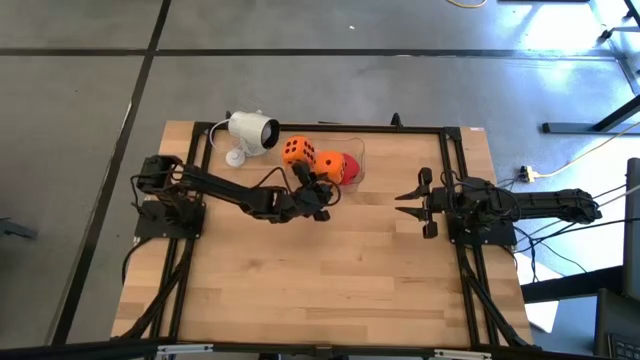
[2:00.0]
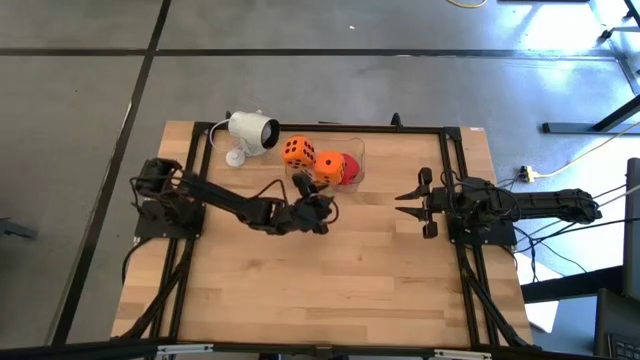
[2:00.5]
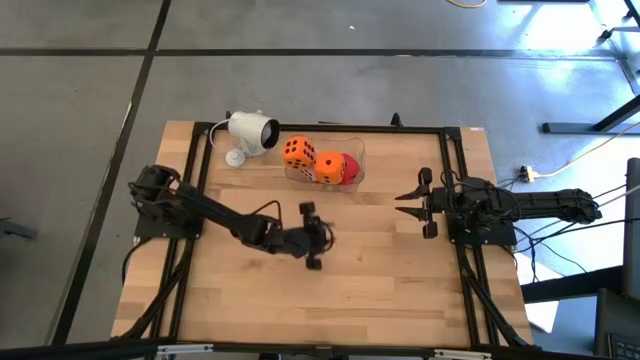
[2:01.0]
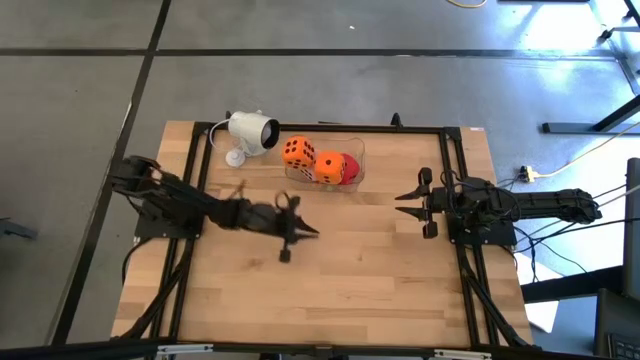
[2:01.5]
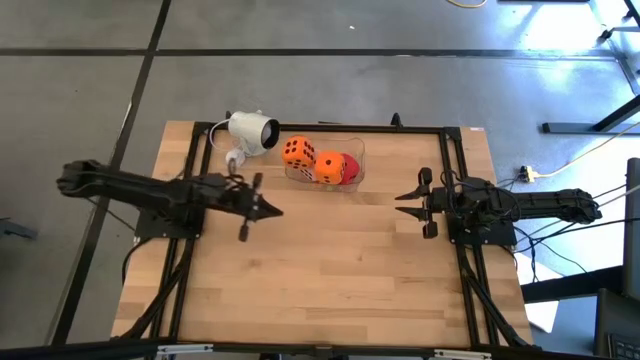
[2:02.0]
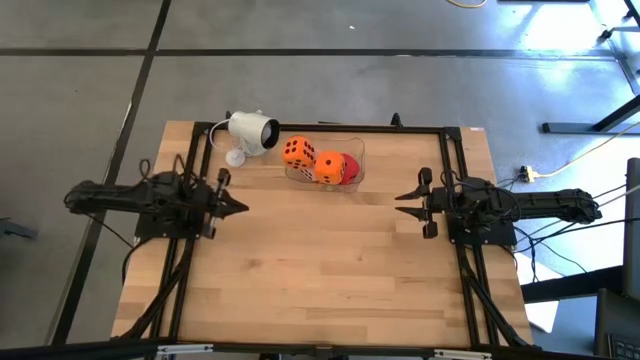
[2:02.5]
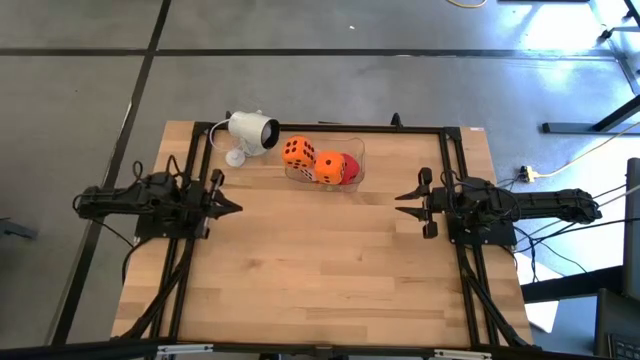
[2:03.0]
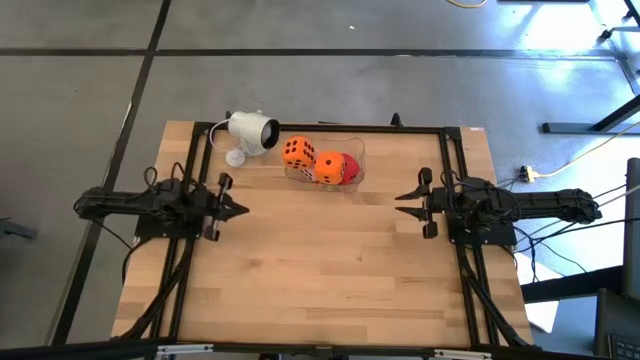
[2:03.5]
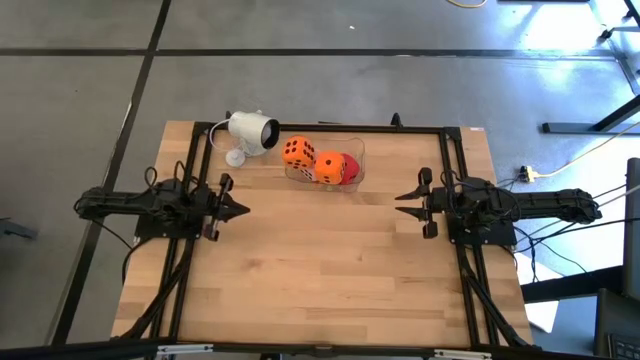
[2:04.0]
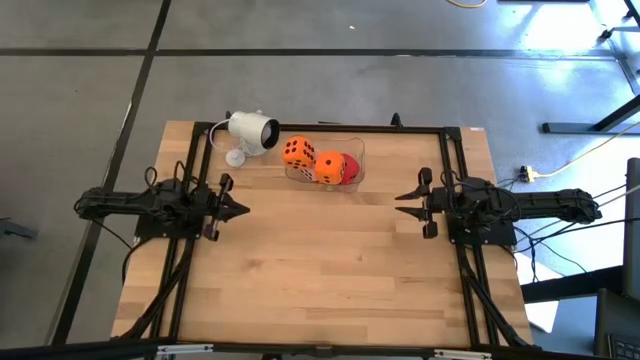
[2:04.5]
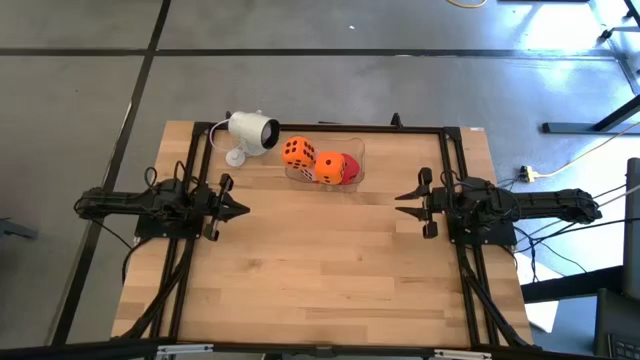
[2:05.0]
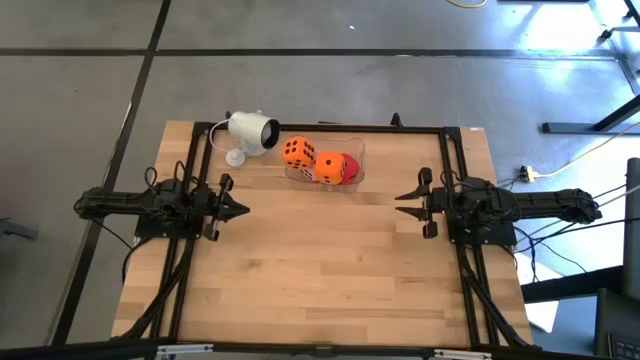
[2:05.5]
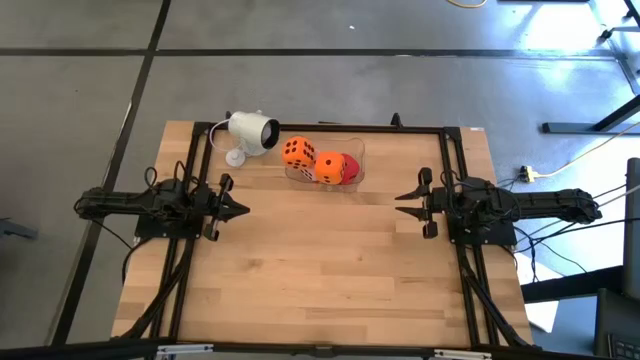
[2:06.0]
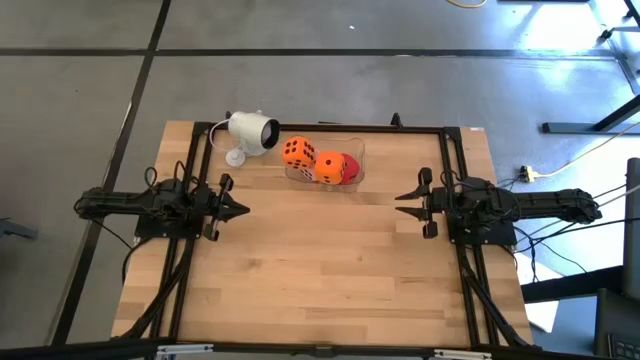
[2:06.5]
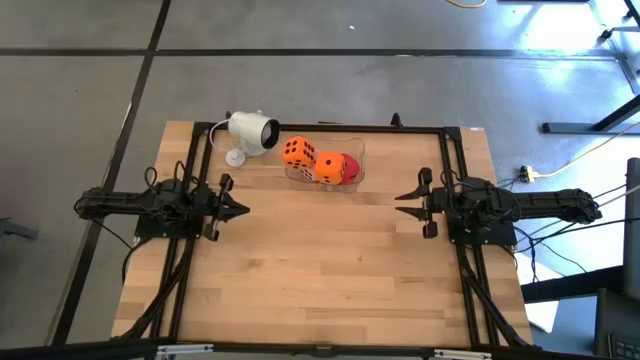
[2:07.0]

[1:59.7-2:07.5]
Task: Pick & Place Dice
Return to Home Position

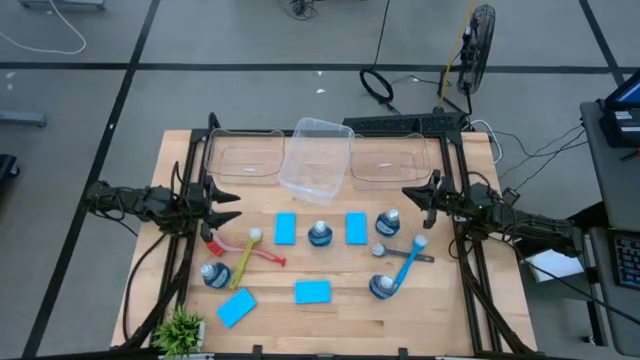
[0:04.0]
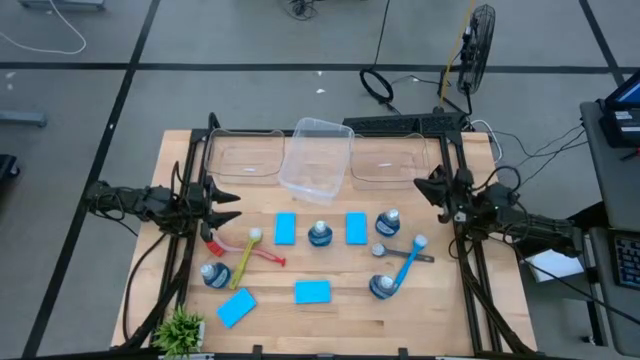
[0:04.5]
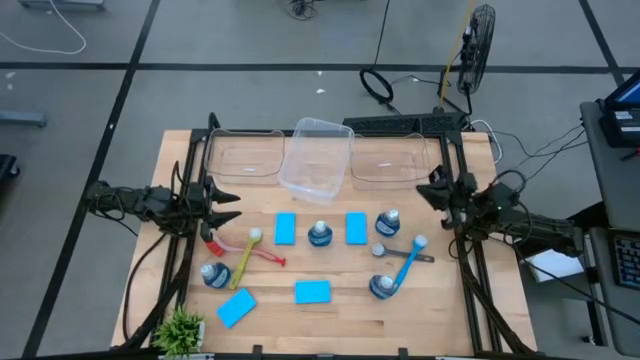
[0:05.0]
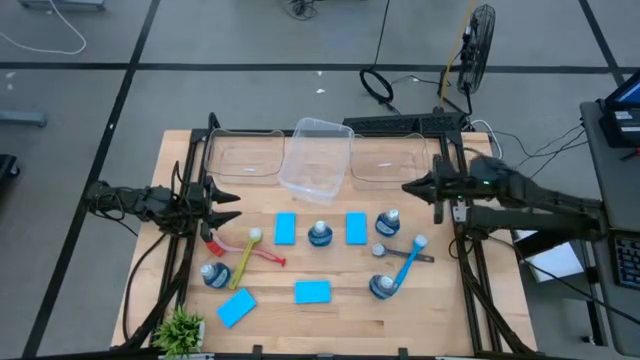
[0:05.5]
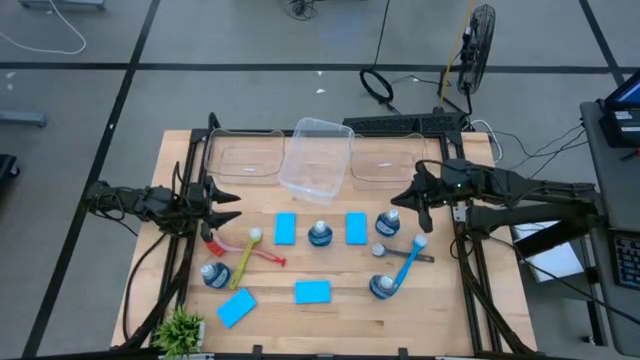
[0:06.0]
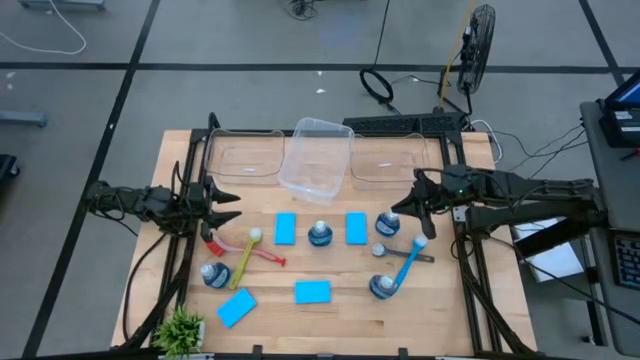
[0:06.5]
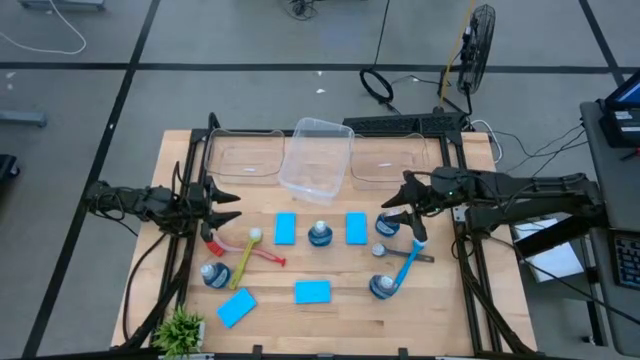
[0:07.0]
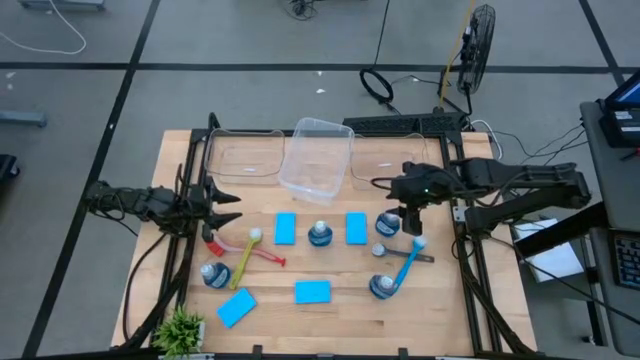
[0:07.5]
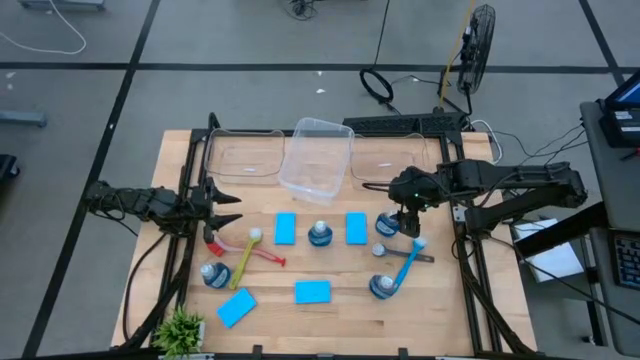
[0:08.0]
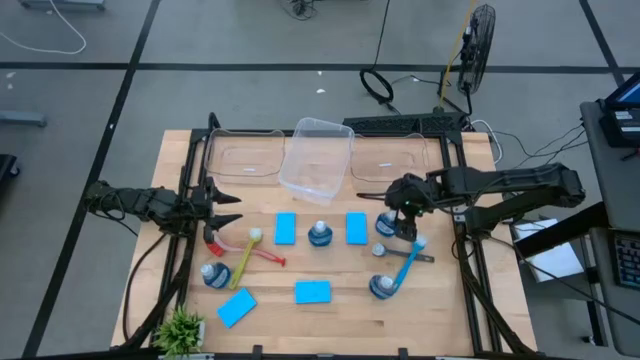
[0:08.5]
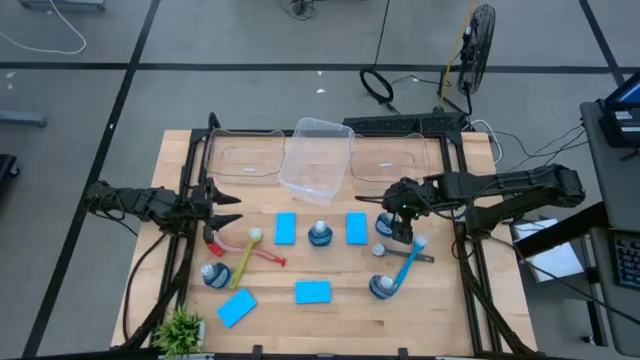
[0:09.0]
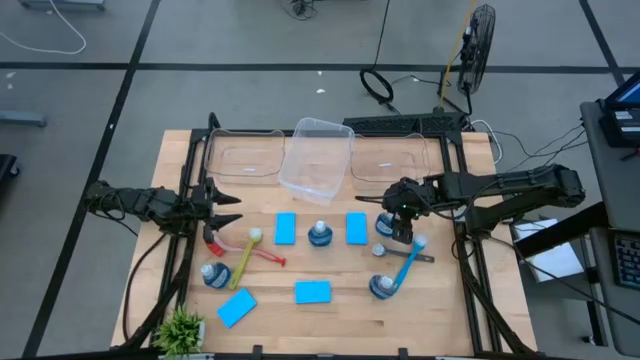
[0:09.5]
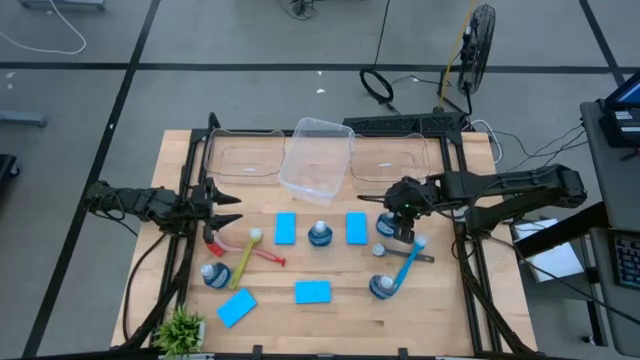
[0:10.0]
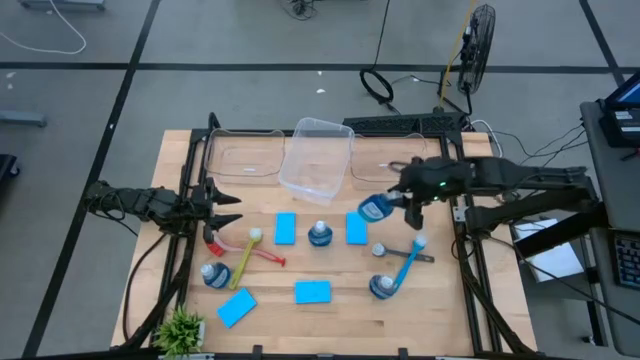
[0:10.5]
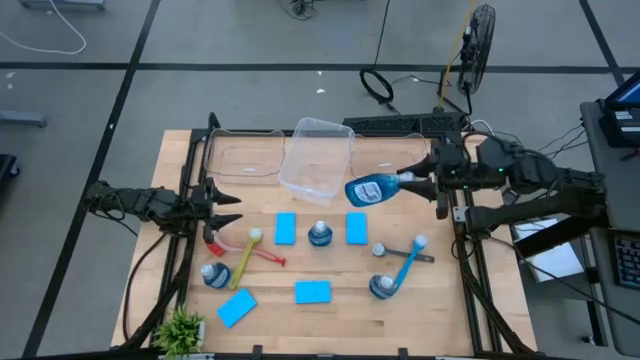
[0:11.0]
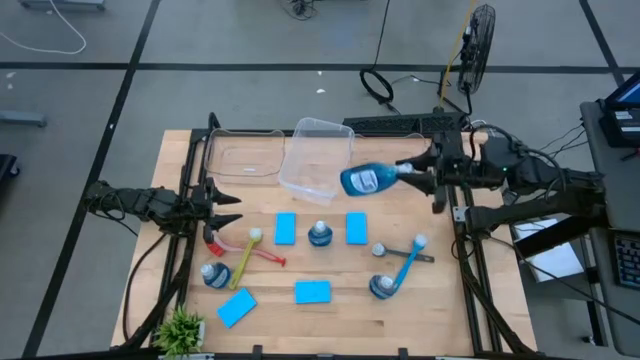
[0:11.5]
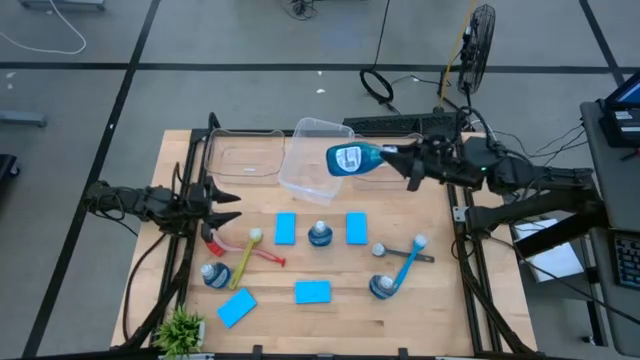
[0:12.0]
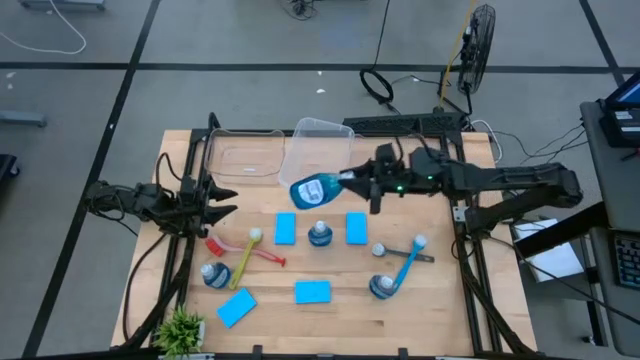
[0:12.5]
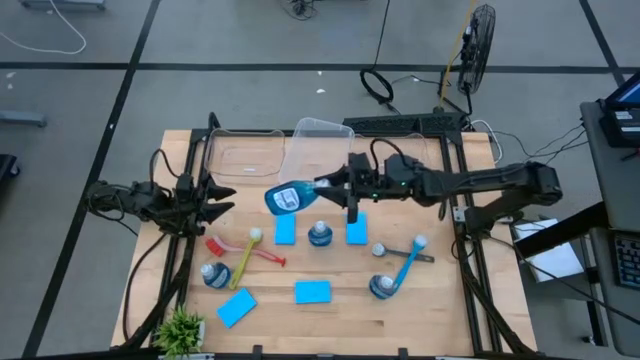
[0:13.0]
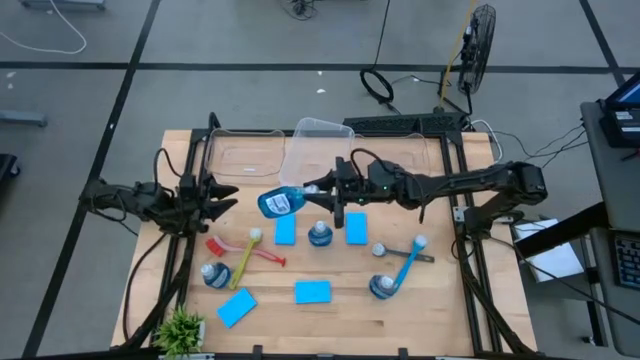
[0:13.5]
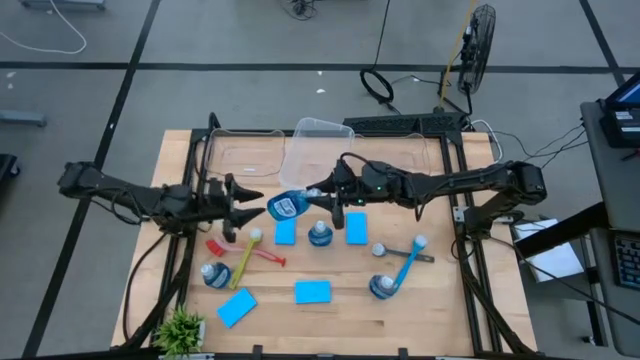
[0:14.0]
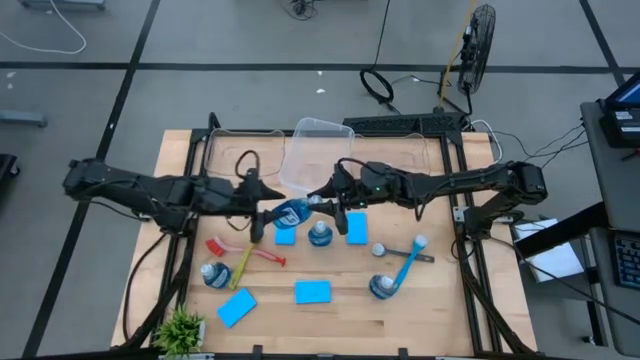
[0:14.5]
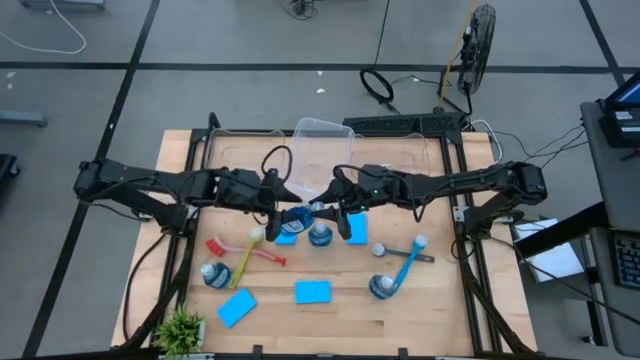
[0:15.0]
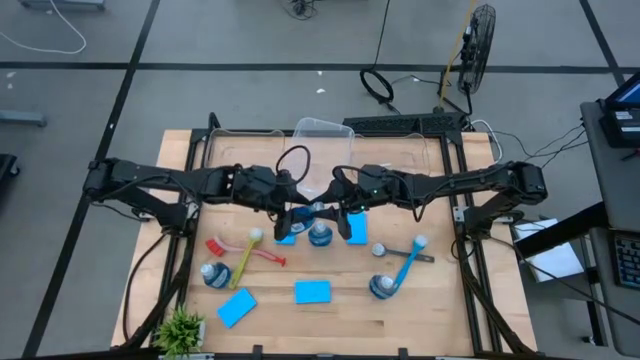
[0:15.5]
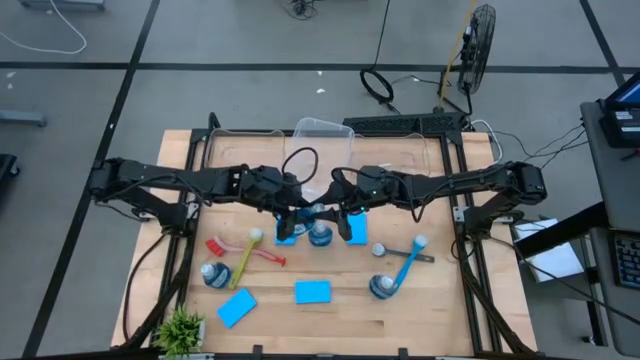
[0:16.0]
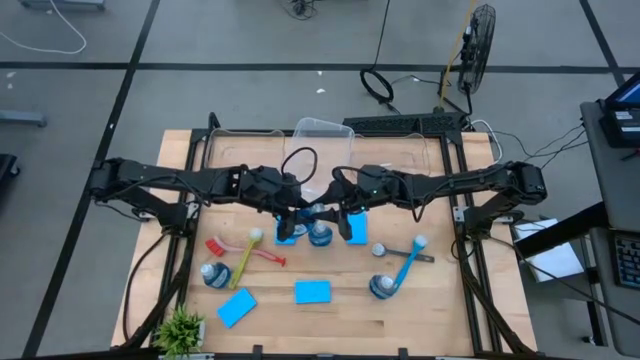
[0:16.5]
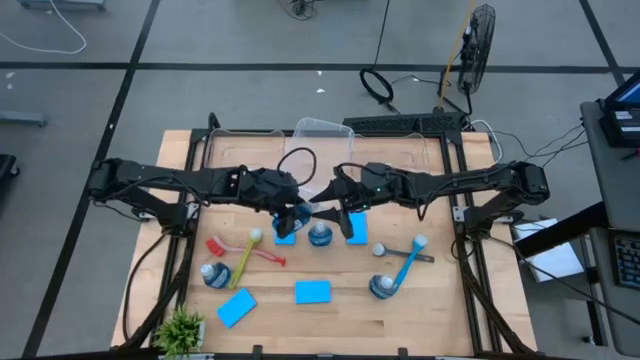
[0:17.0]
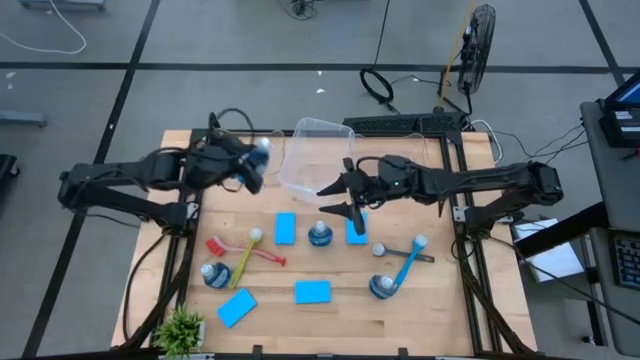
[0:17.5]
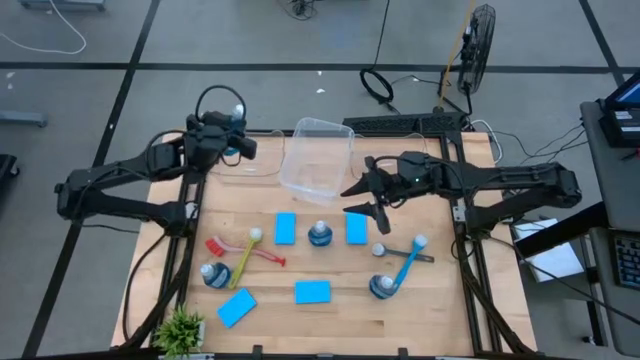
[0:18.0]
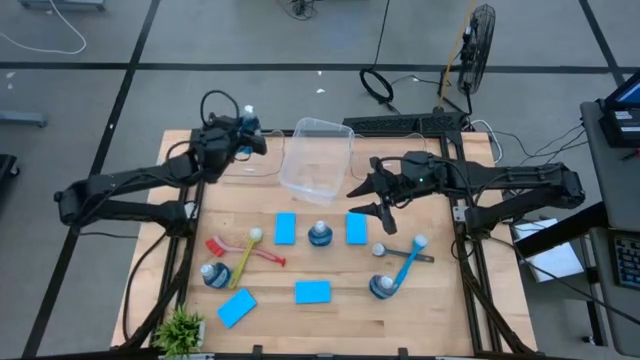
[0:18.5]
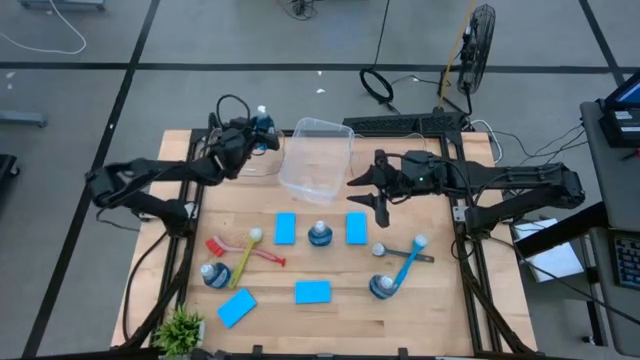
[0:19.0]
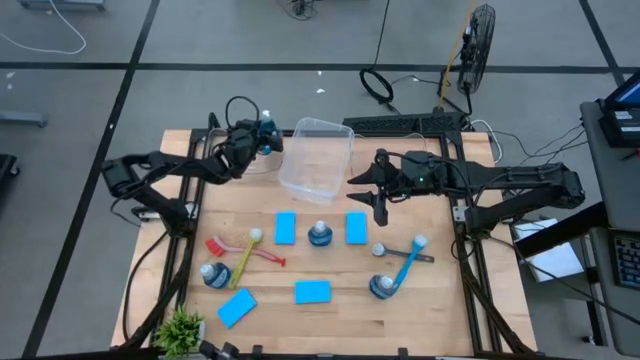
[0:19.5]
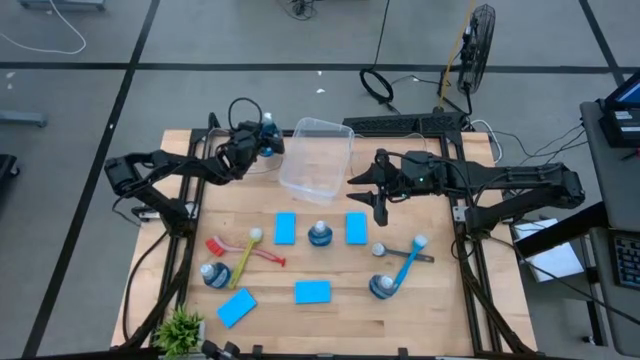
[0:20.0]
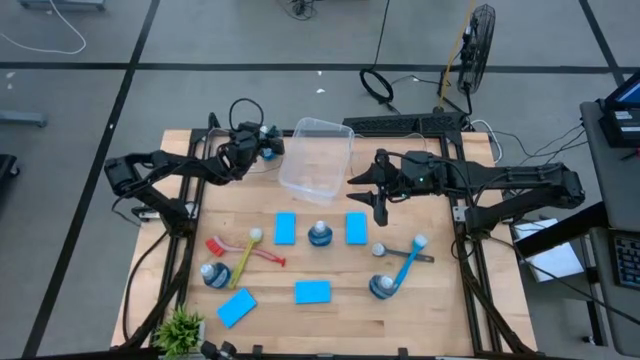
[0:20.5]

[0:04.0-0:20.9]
Task: Pick & Place Kitchen Sink Supplies
Put the blue dishwashing liquid into the left transparent bin
